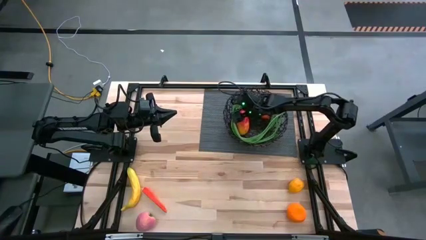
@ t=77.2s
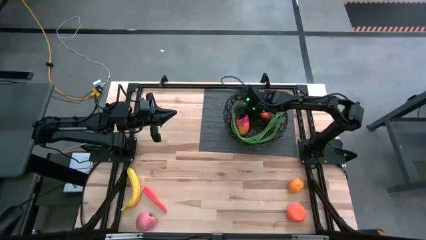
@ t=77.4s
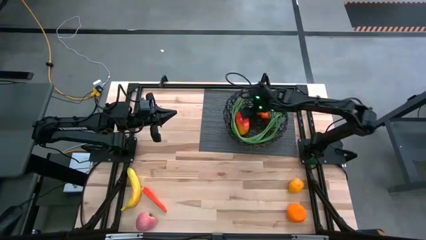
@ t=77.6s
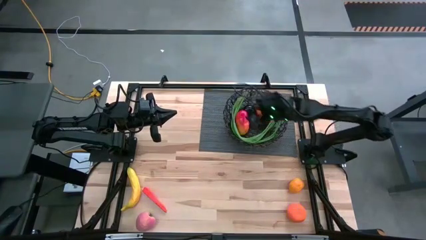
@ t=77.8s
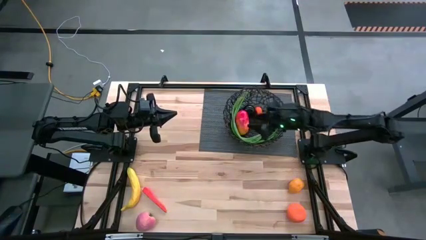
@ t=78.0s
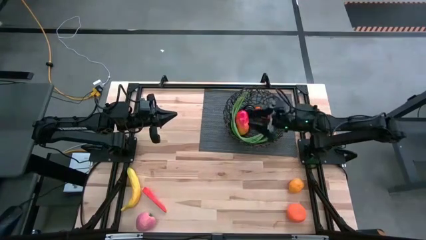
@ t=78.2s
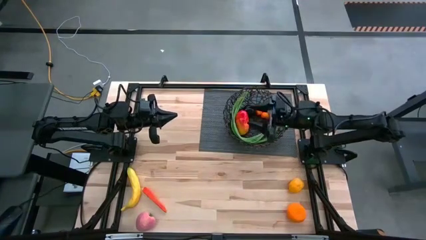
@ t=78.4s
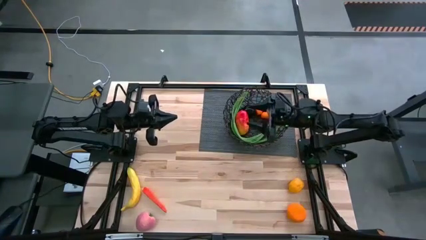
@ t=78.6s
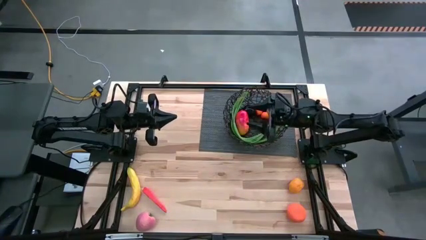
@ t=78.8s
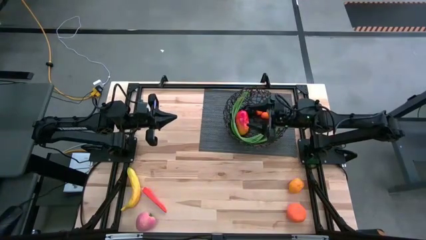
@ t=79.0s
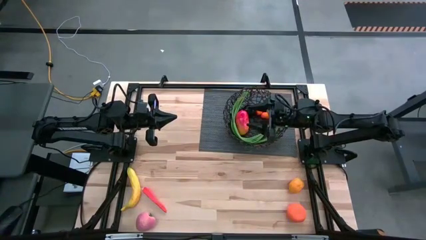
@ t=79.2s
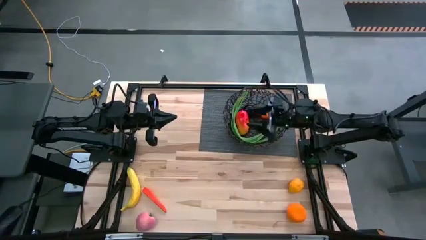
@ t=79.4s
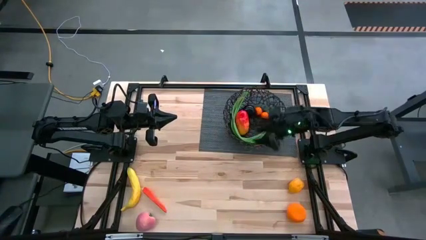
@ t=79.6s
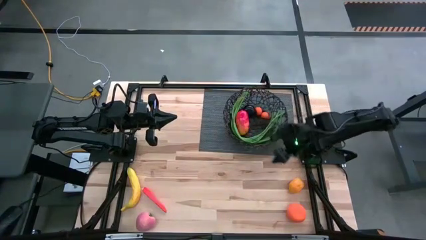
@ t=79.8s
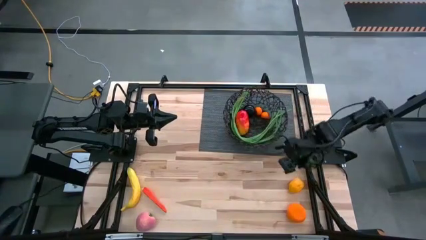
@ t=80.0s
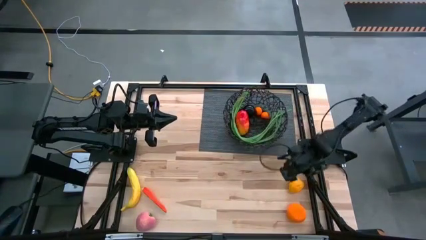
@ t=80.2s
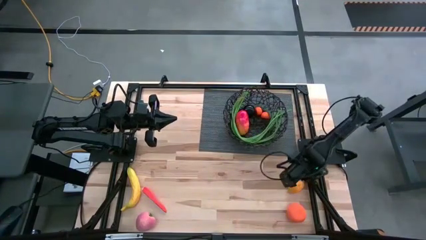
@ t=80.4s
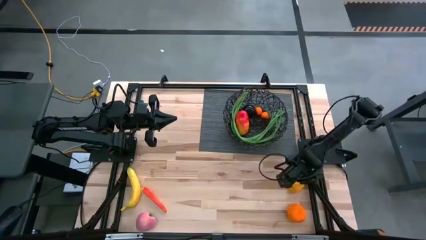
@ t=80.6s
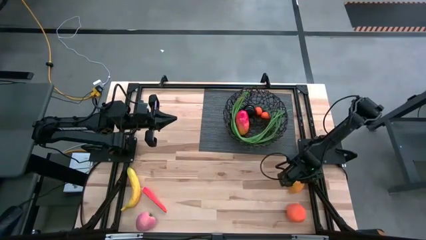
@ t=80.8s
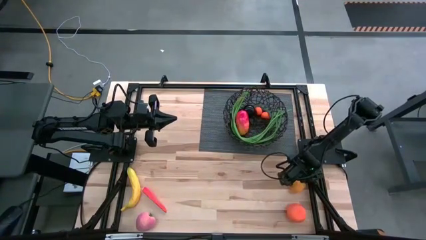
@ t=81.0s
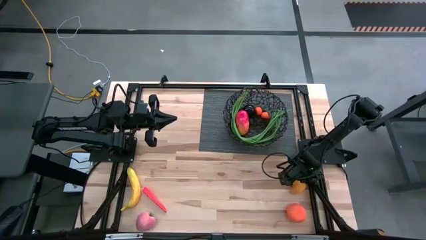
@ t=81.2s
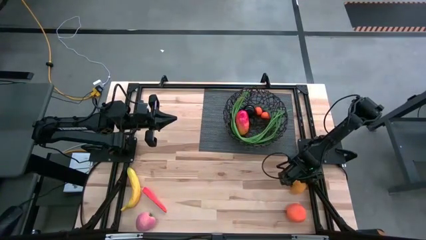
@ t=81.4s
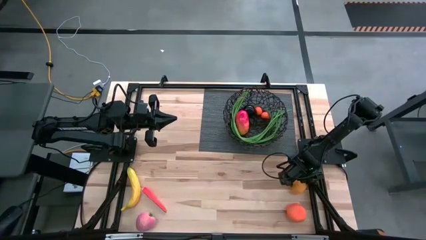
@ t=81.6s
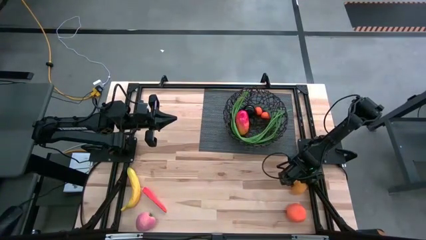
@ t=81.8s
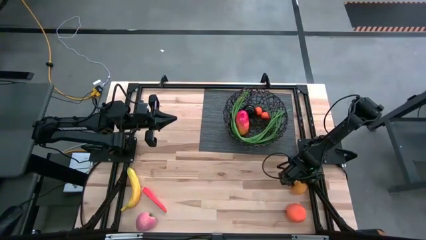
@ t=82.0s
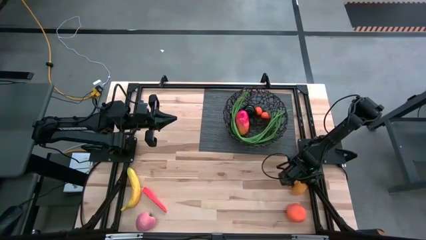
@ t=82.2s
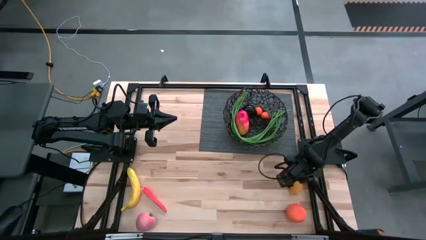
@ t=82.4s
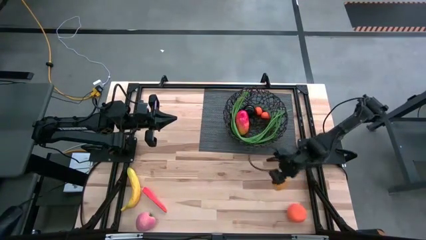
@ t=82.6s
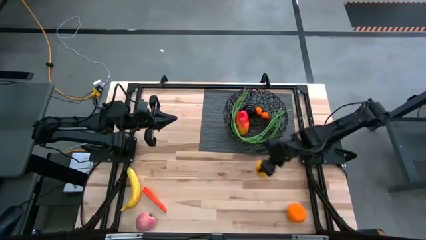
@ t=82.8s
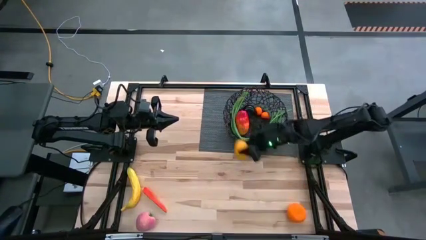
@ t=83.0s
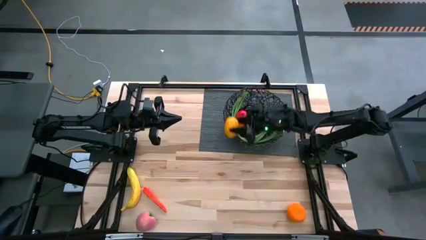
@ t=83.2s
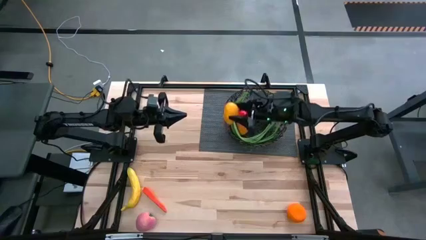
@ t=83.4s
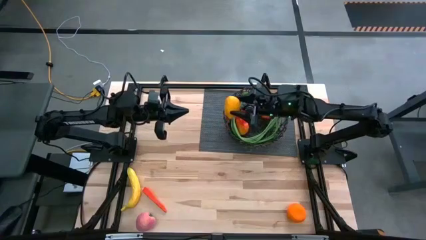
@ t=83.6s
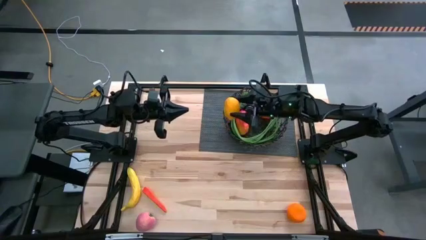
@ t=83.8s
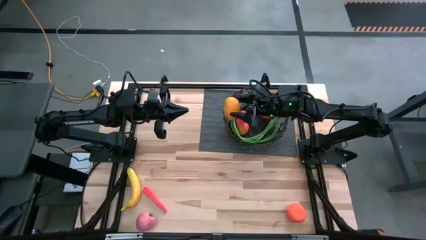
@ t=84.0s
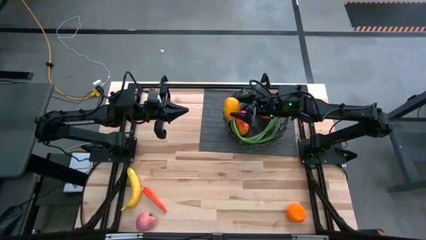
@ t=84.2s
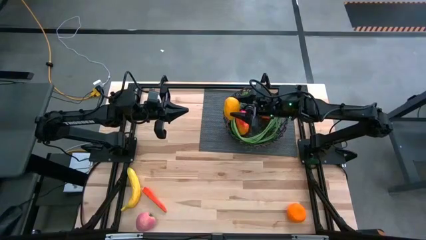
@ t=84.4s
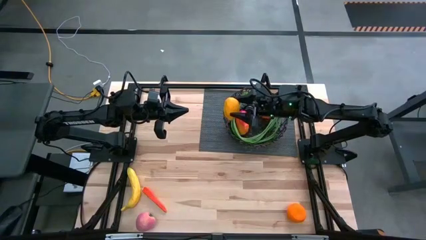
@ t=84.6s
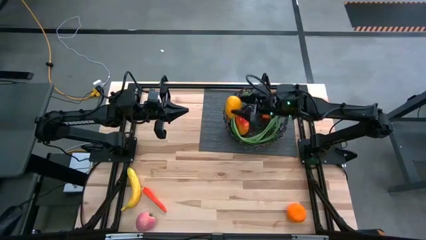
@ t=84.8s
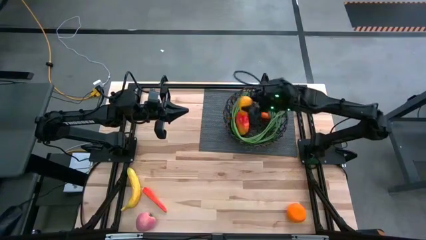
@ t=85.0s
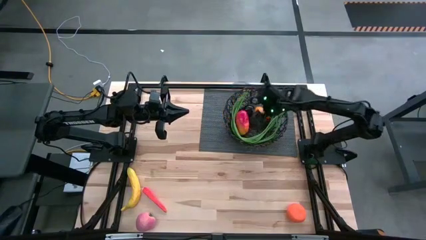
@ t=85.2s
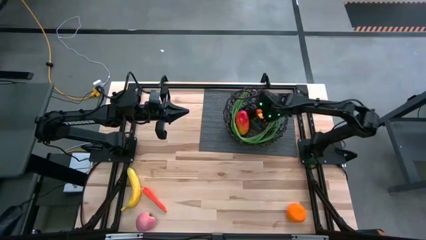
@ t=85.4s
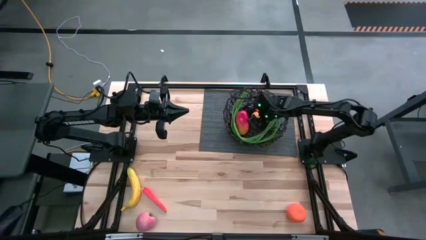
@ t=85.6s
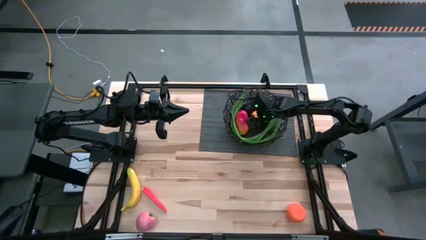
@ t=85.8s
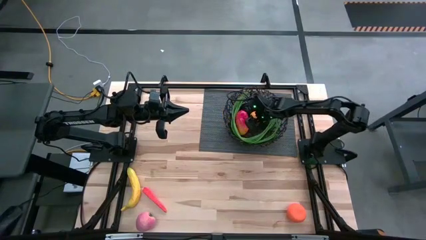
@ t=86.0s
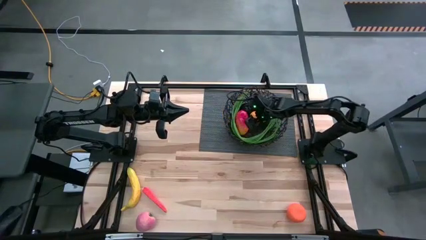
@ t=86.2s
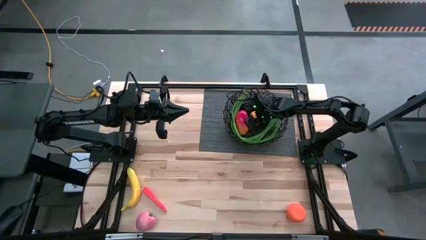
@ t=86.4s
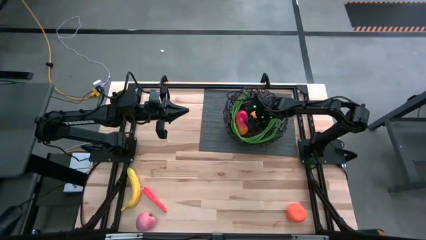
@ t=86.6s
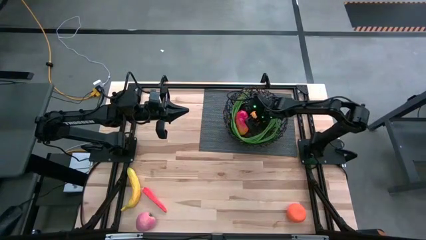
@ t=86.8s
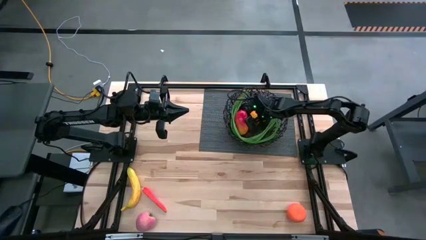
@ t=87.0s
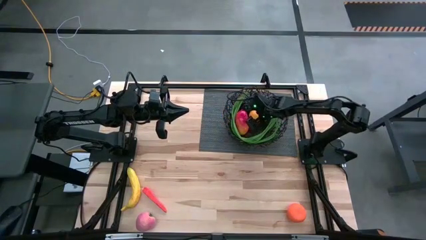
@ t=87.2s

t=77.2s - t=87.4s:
Task: Build produce basket
Put the lemon into the wire basket

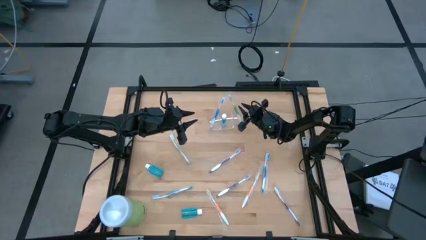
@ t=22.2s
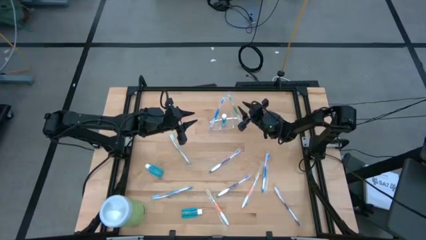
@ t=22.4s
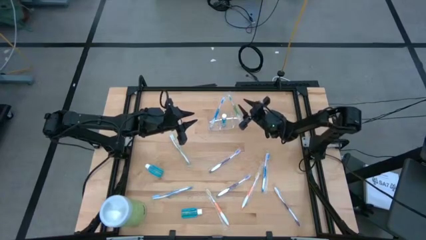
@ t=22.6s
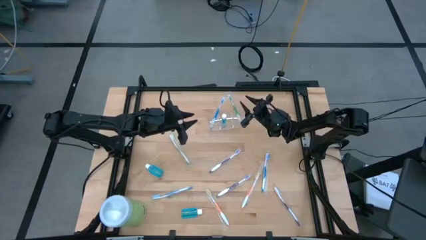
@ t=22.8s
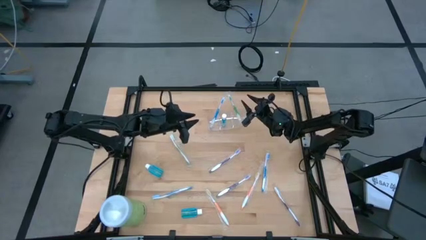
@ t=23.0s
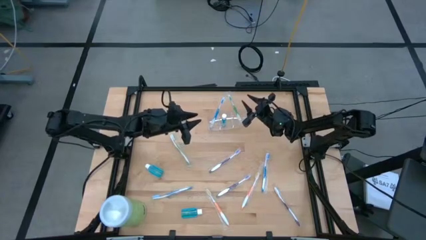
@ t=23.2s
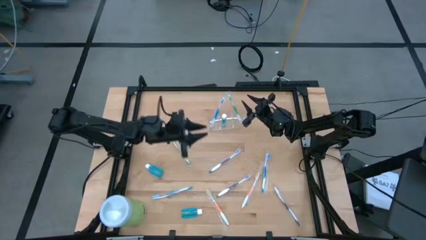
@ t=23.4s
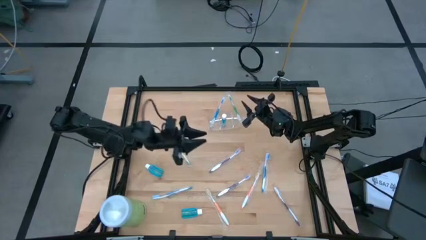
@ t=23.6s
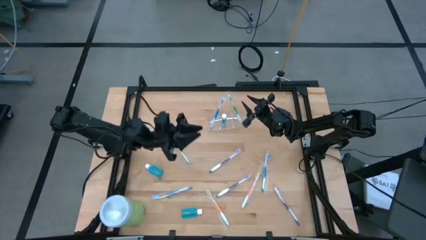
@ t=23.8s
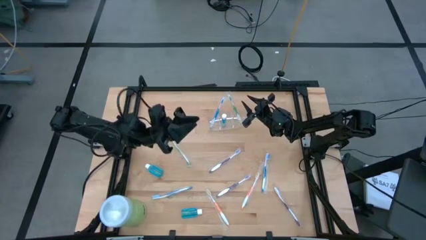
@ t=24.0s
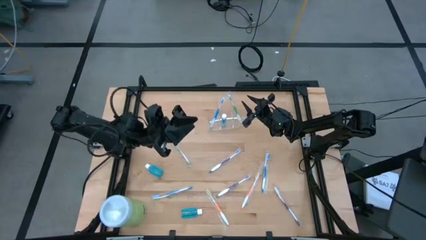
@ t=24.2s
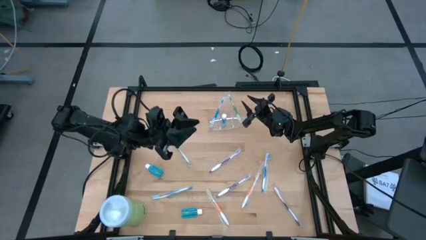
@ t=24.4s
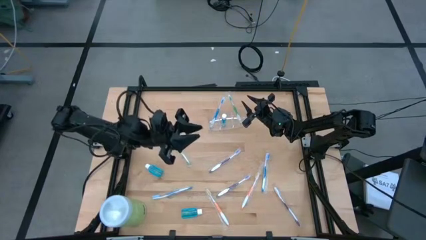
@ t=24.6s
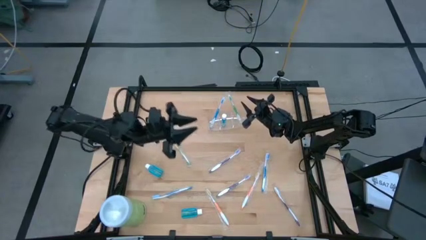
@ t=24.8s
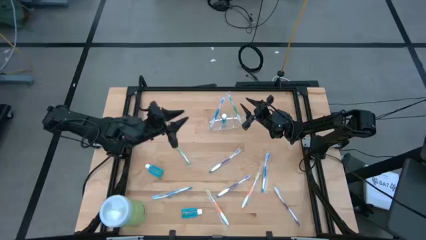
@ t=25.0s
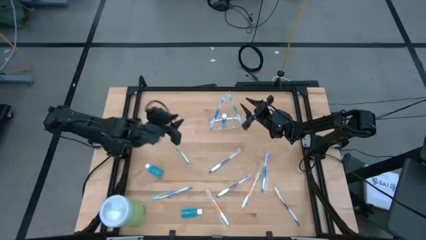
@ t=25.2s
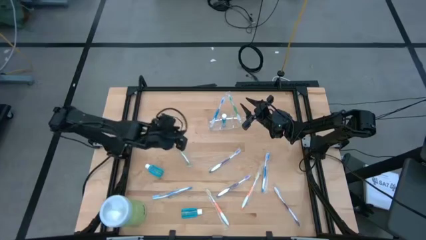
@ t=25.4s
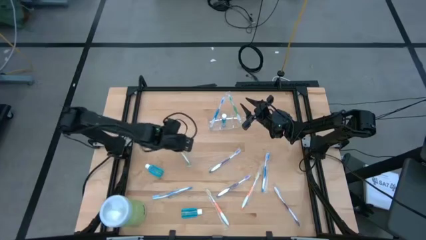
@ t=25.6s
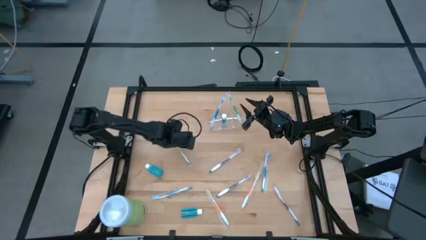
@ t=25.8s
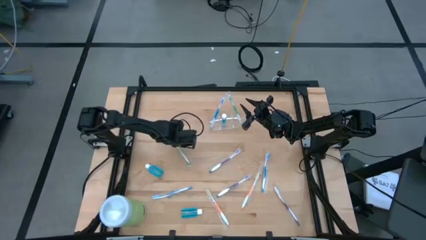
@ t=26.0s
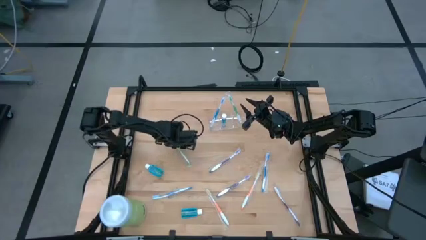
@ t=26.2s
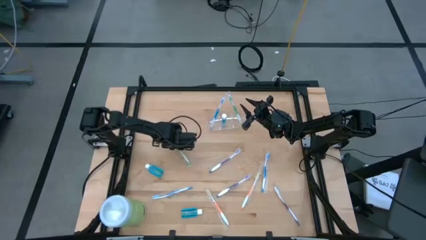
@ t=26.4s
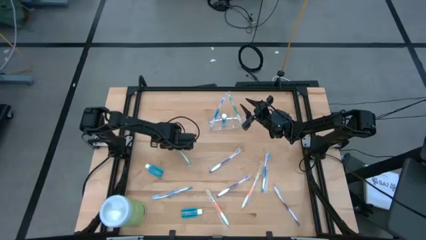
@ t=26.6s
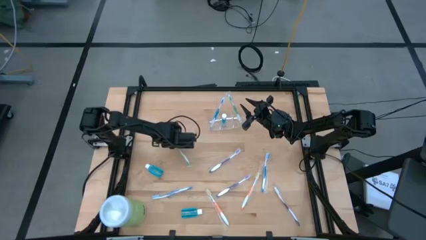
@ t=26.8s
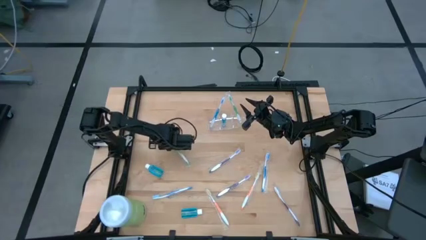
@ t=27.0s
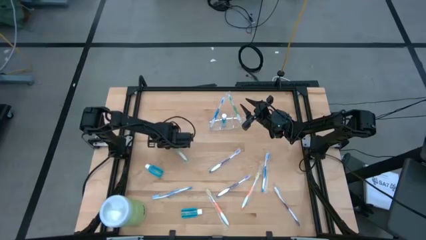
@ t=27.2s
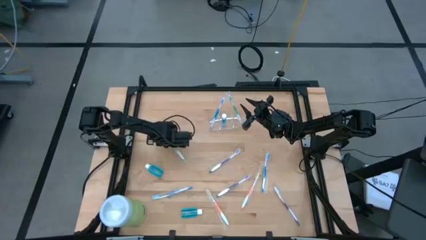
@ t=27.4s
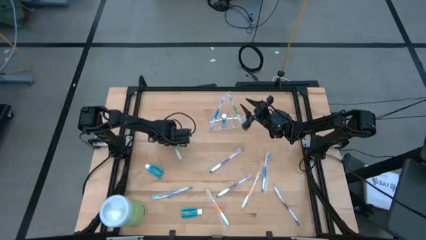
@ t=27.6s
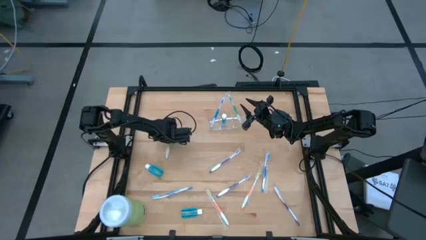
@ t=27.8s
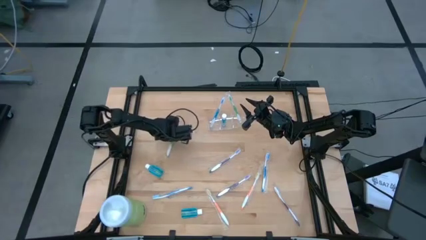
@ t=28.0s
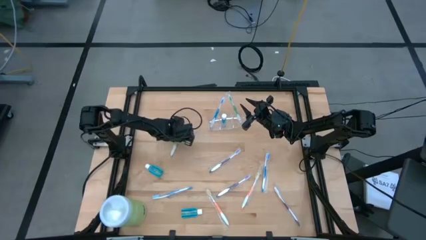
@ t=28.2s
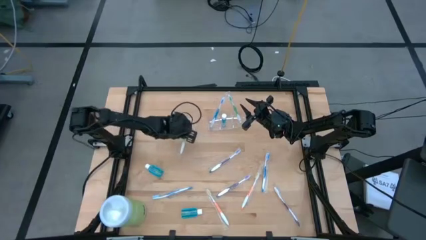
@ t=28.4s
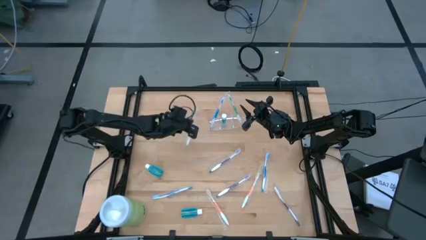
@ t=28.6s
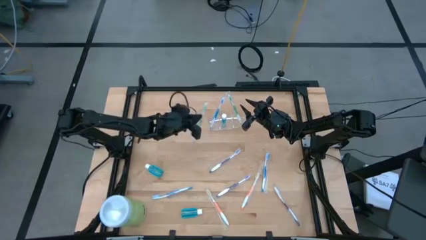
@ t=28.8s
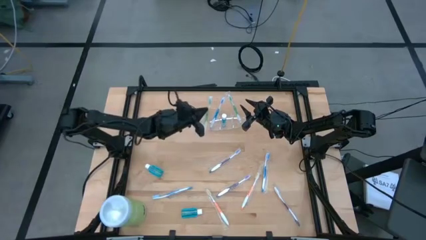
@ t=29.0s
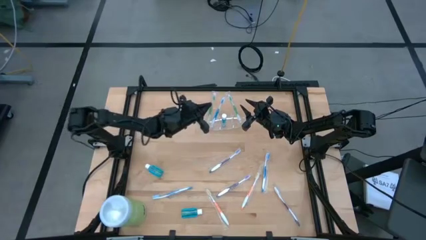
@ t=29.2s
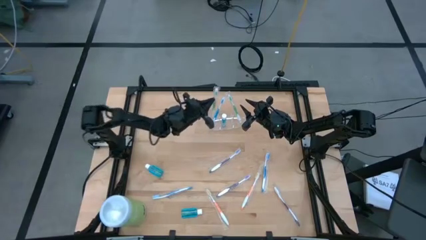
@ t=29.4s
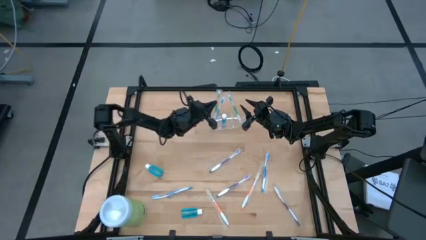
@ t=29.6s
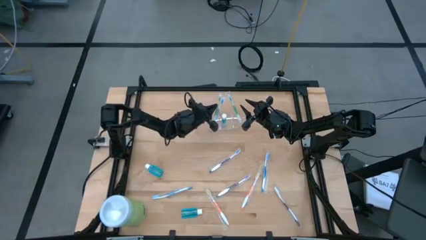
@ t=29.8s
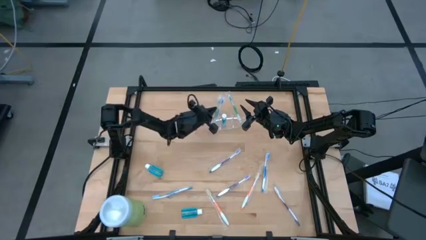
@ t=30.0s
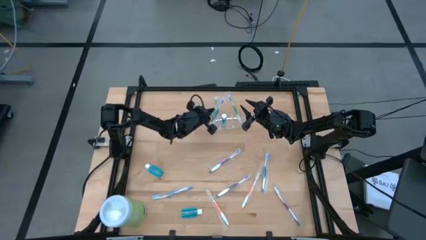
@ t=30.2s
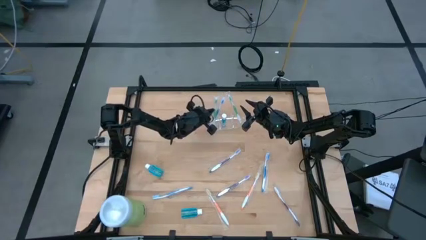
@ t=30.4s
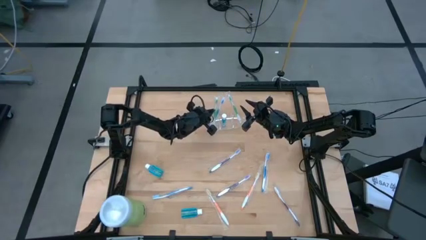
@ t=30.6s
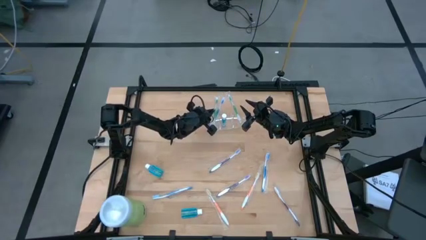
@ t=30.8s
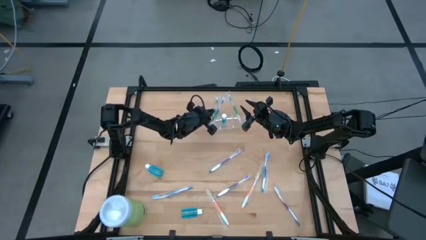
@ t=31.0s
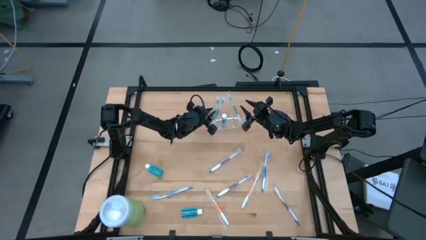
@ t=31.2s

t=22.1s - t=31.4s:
Task: Pick & Place toothbrushing station
Put the green toothbrush into the left section of the transparent organizer
